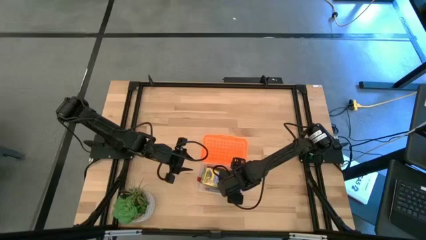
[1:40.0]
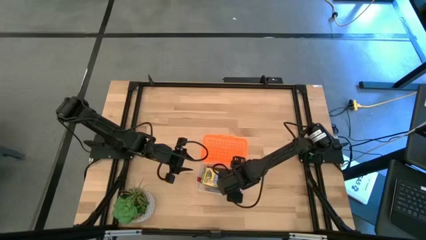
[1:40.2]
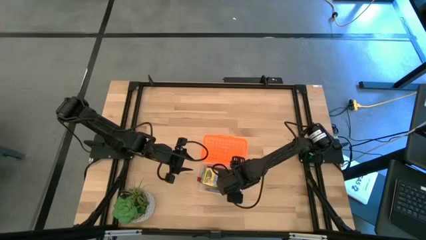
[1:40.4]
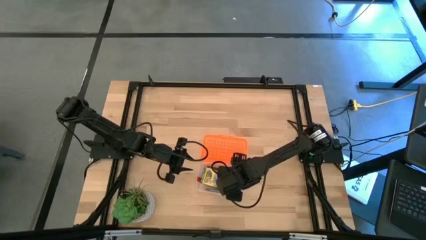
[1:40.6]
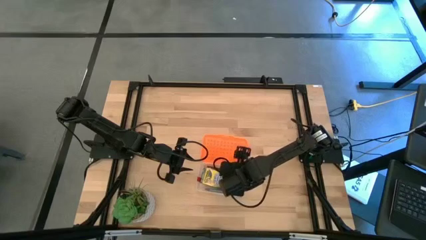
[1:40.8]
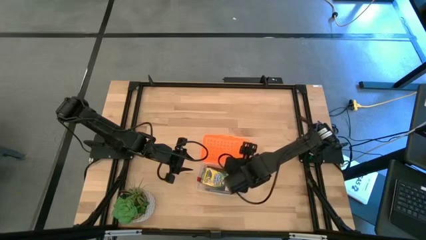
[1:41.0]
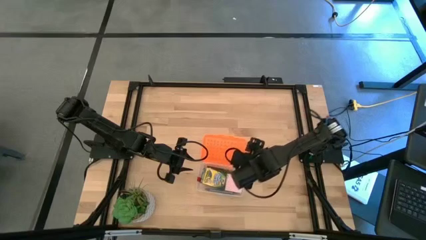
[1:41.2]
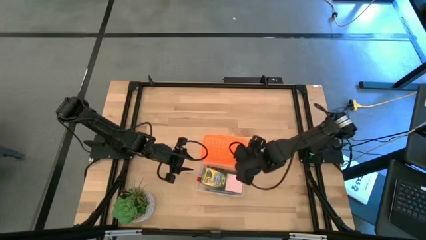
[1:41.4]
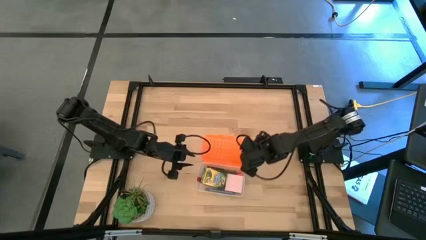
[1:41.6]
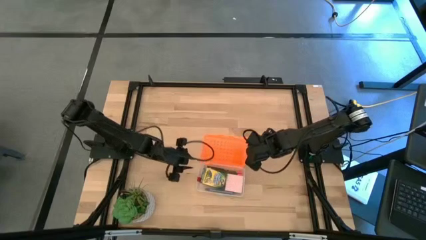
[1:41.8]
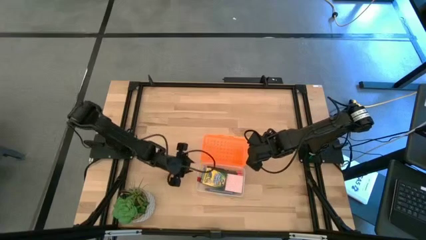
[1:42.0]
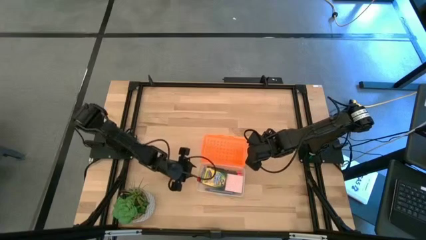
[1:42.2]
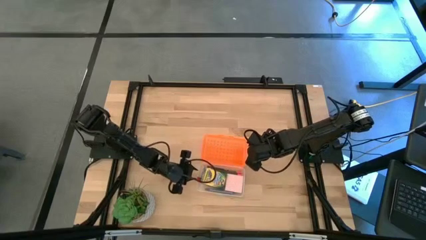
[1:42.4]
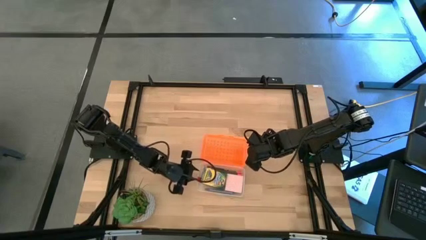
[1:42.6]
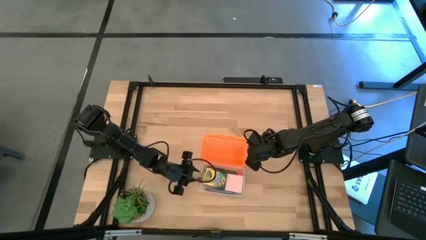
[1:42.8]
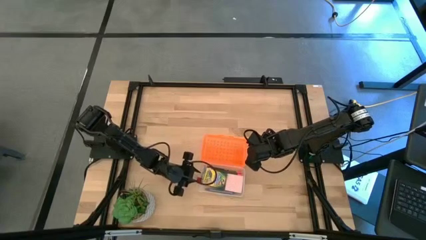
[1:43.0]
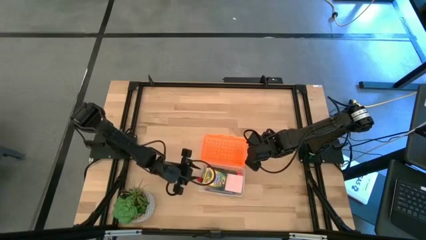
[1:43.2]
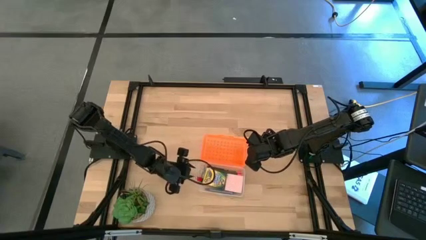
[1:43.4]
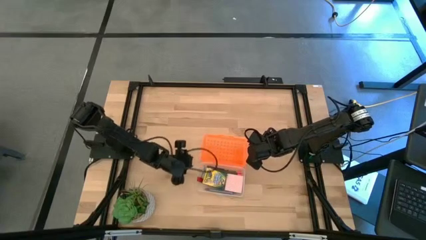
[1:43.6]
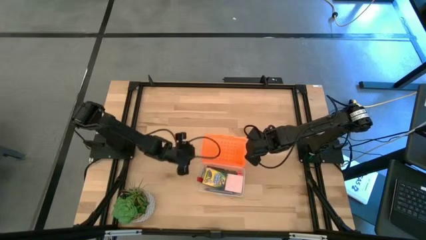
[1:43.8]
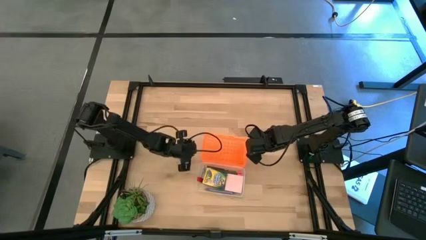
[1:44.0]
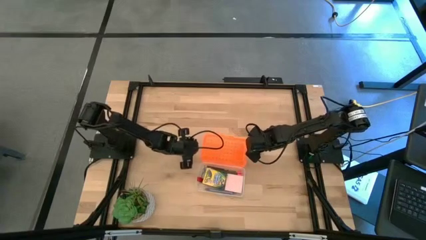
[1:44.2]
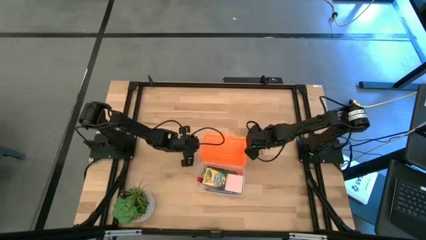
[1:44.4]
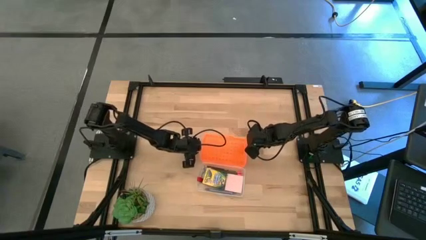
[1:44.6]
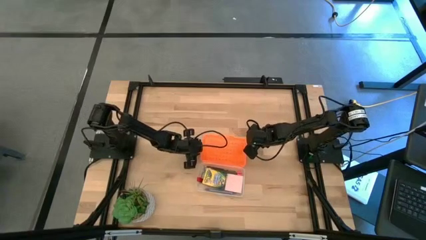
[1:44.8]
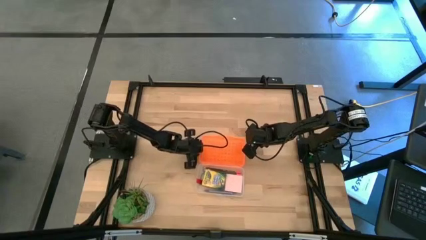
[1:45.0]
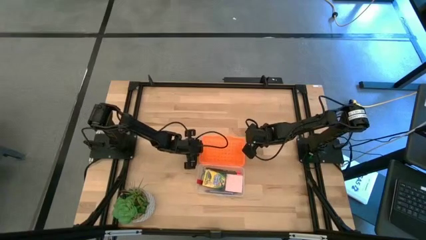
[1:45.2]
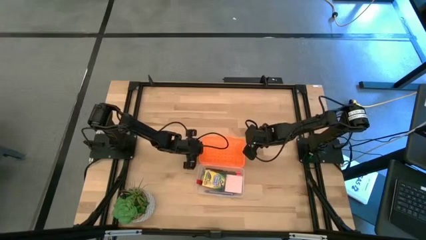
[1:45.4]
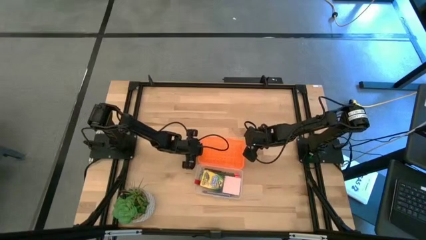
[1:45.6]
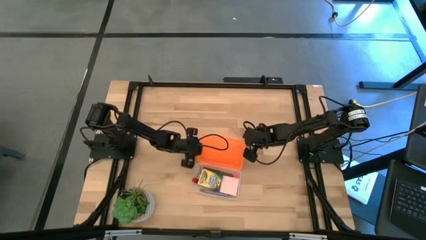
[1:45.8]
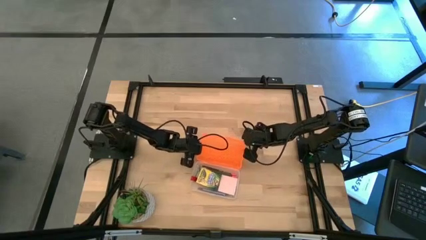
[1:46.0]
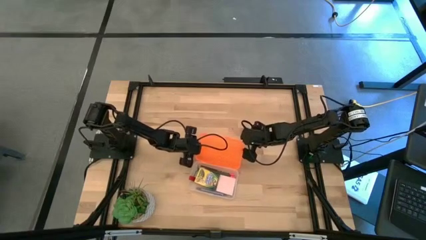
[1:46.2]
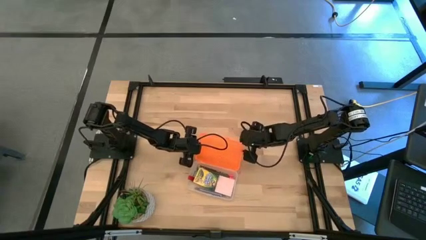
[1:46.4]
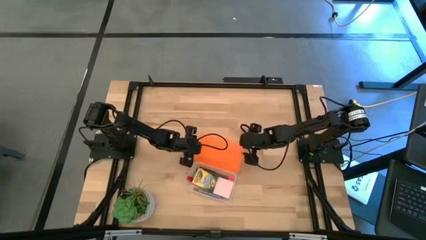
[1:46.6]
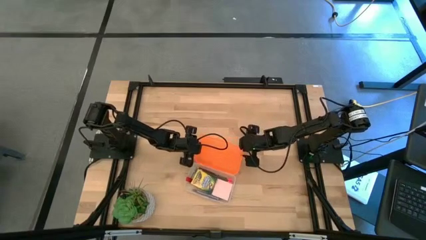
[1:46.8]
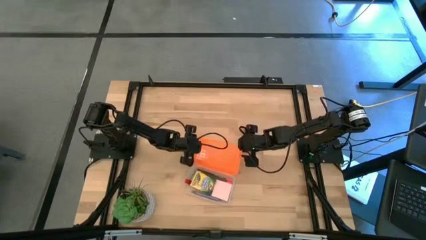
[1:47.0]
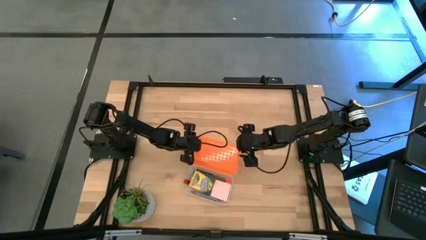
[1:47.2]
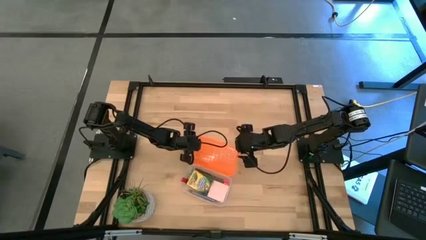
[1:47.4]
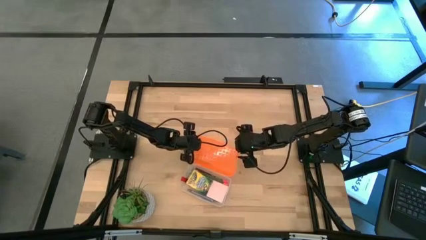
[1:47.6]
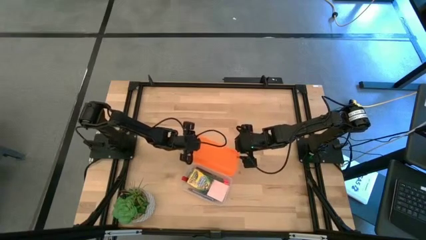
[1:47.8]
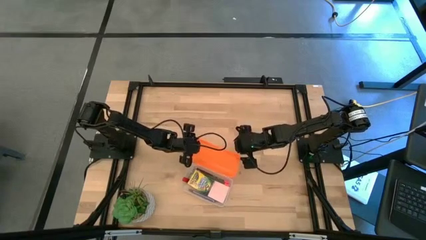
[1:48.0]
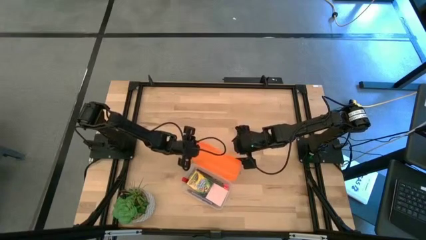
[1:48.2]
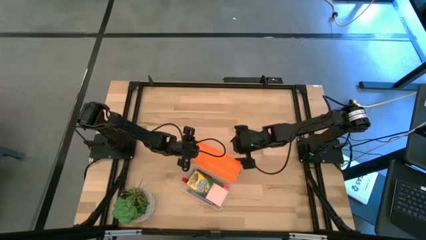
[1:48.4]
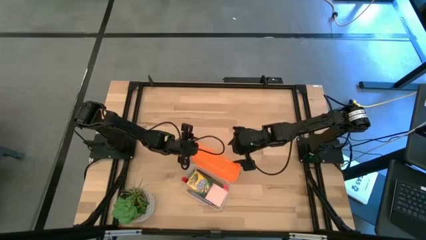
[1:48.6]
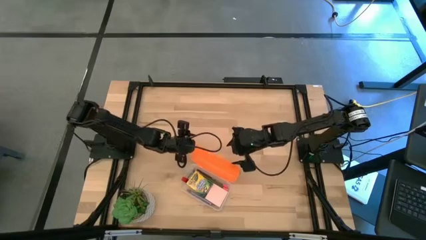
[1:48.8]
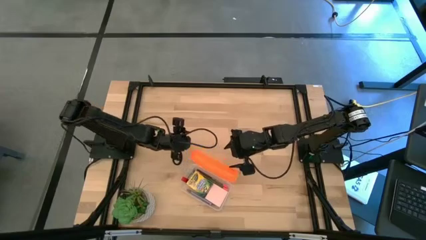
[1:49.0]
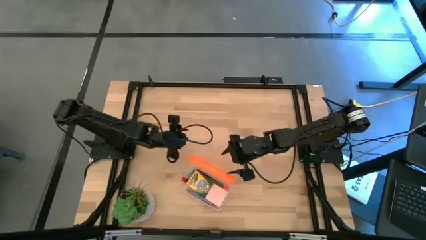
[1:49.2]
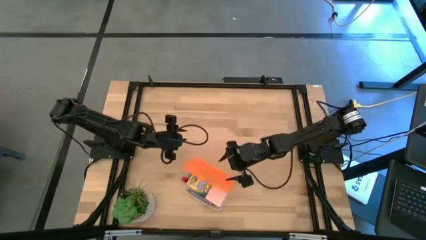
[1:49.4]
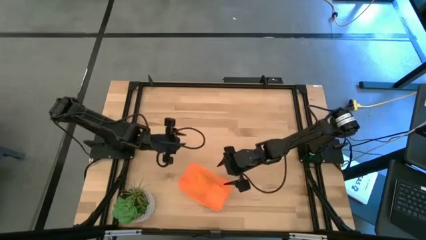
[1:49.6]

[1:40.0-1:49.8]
Task: Pack school essentials
Close the orange supply box

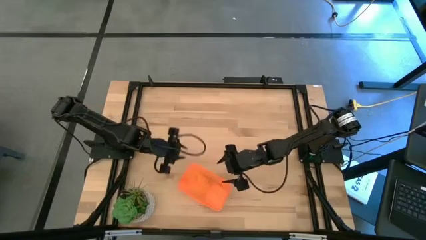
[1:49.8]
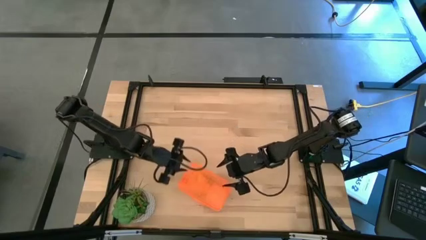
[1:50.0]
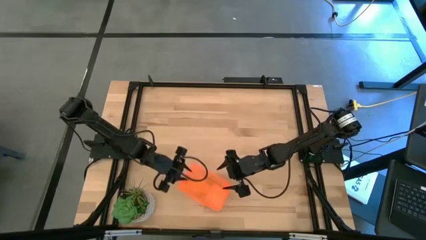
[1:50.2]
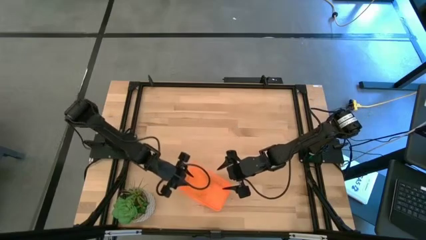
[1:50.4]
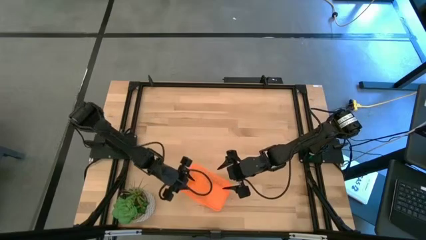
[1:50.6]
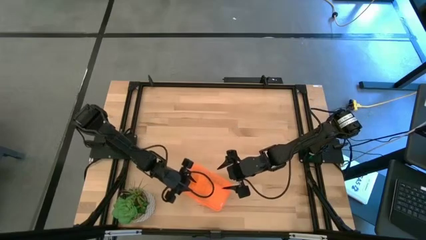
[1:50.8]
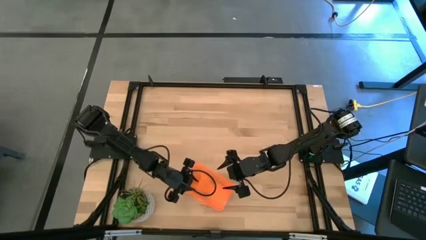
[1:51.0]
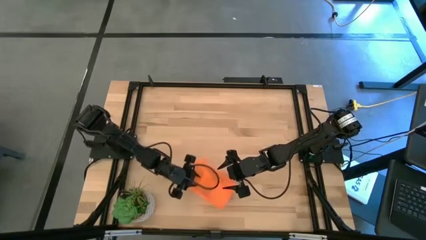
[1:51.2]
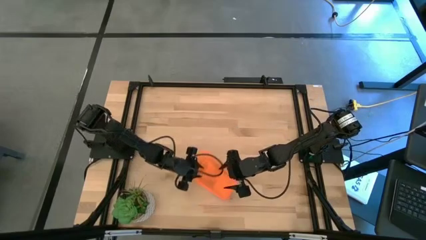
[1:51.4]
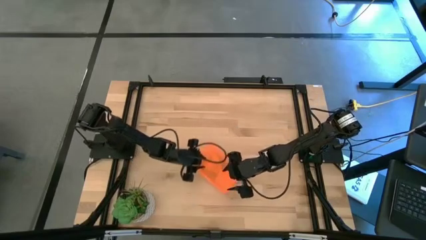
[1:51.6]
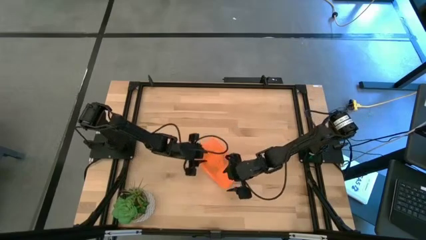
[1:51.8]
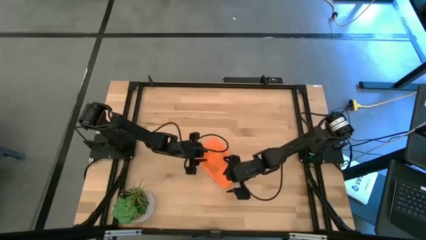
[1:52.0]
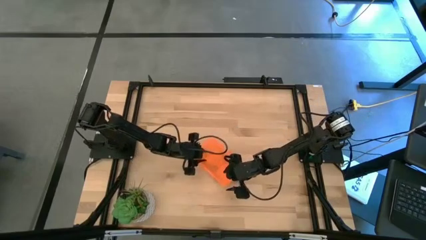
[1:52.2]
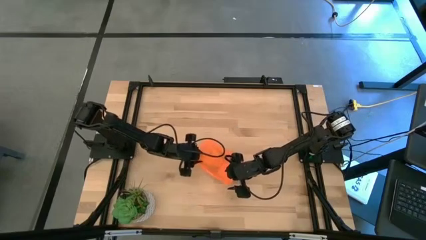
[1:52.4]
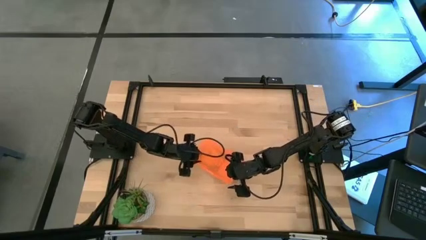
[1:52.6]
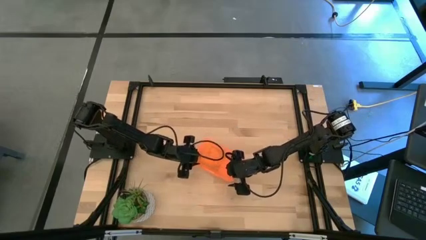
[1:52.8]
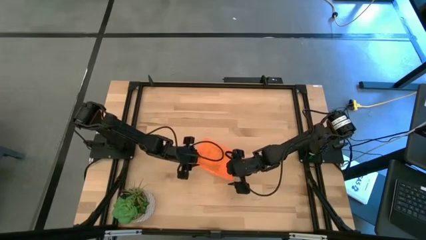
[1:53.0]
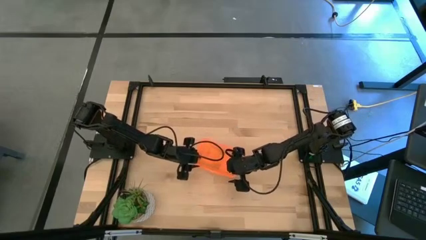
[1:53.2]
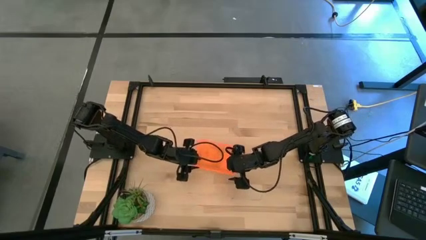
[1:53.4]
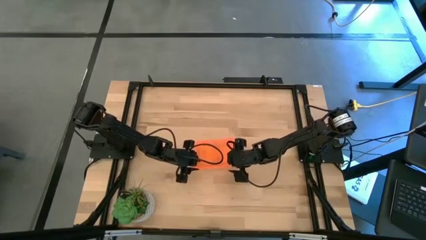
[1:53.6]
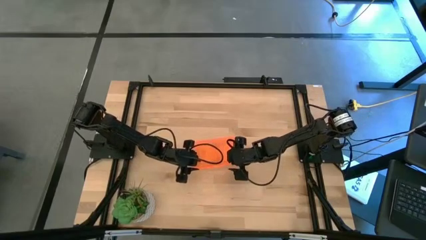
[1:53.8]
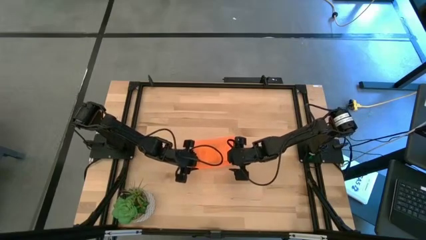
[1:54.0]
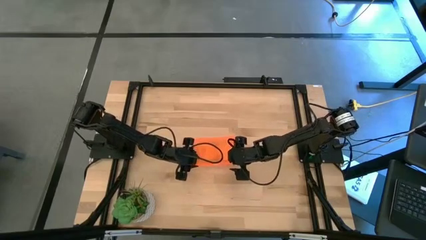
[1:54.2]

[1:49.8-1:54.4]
Move the orange supply box to the center of the table

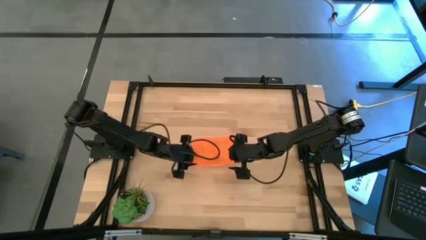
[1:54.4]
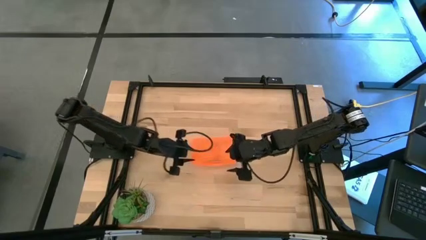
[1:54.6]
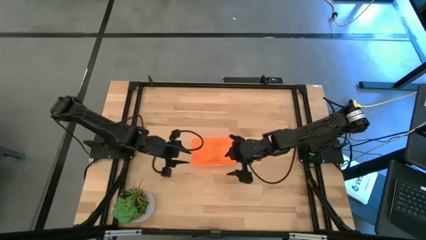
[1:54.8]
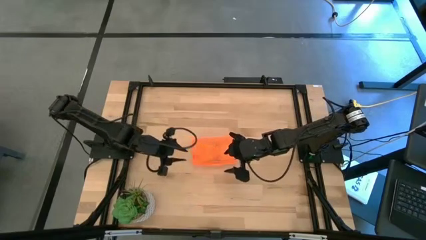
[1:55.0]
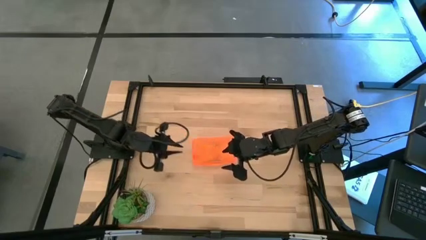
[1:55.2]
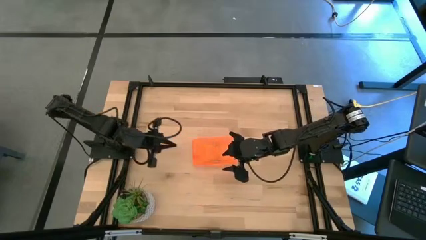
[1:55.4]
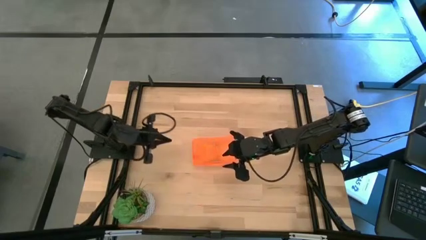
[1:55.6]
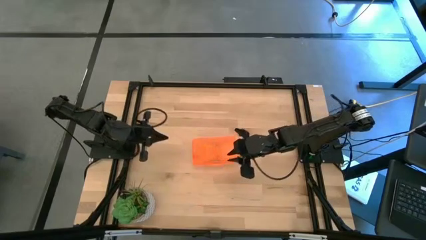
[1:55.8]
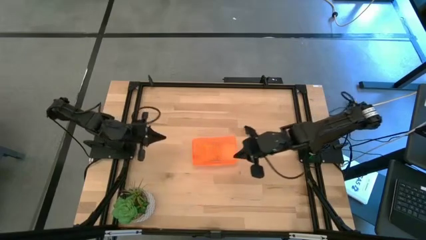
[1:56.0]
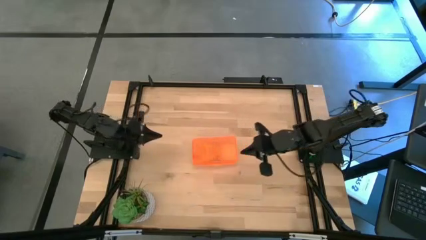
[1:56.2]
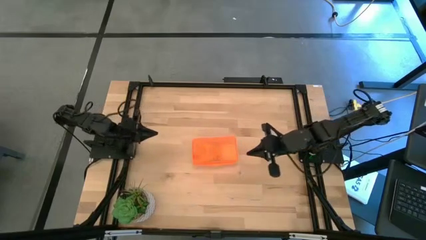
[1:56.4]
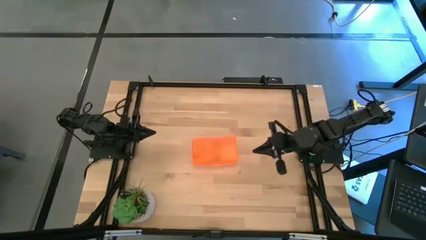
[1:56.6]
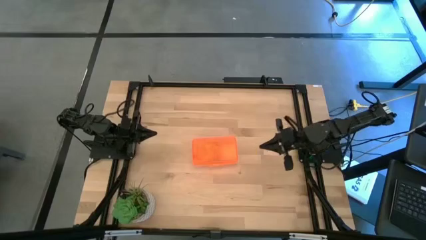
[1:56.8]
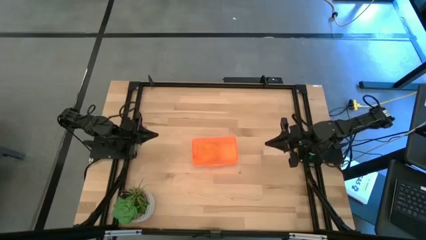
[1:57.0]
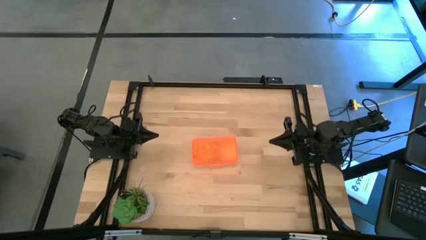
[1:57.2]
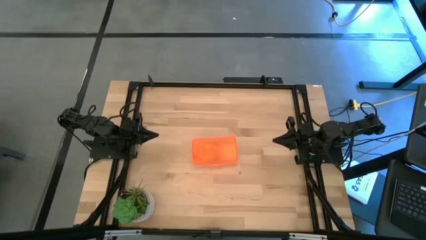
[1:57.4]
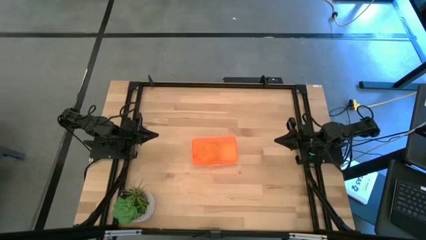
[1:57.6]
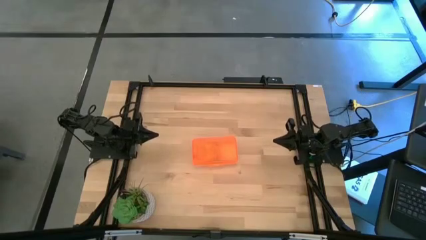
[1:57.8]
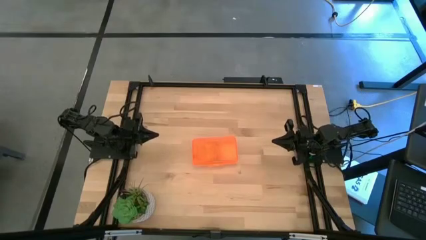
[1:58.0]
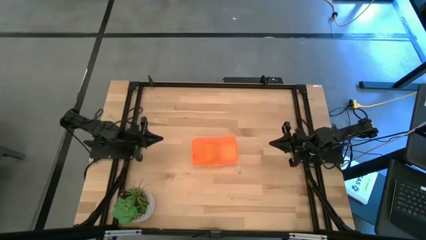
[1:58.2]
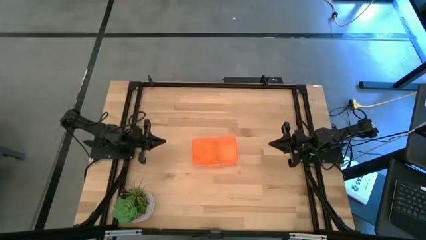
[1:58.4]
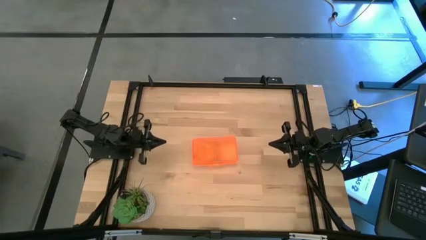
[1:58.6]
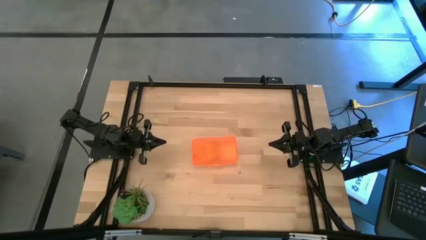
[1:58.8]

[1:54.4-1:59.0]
Return to Home Position
